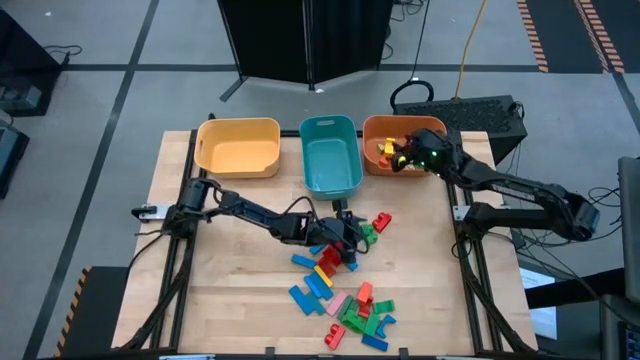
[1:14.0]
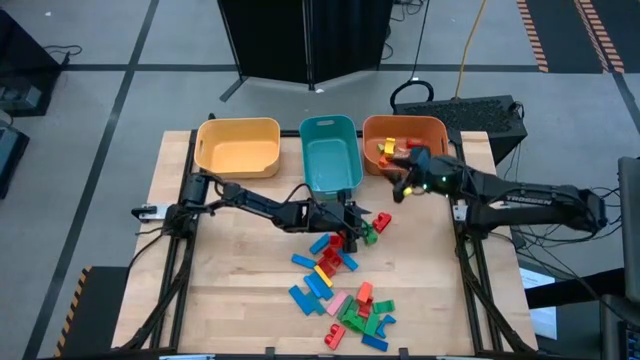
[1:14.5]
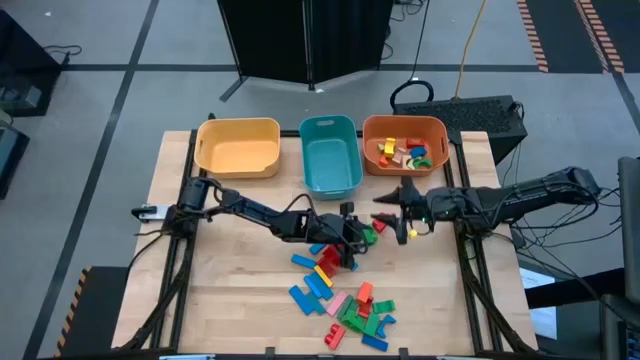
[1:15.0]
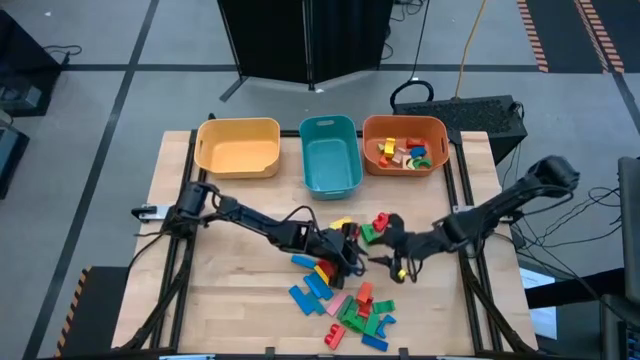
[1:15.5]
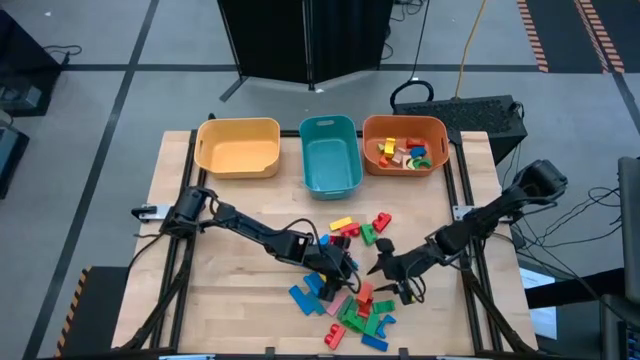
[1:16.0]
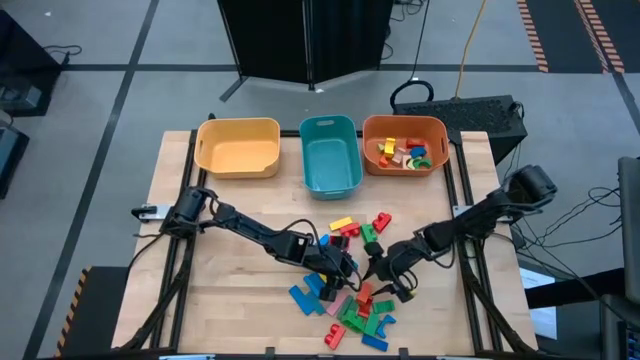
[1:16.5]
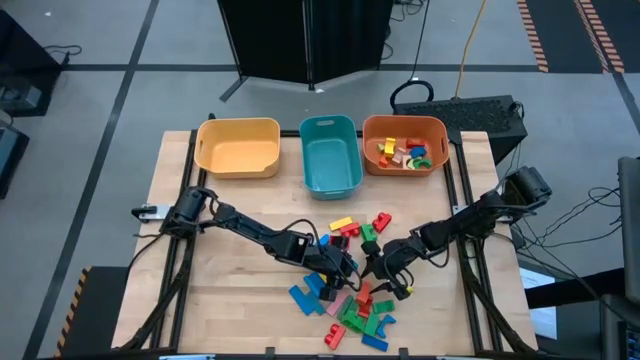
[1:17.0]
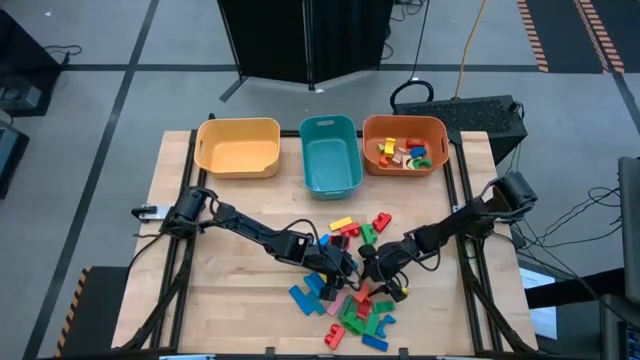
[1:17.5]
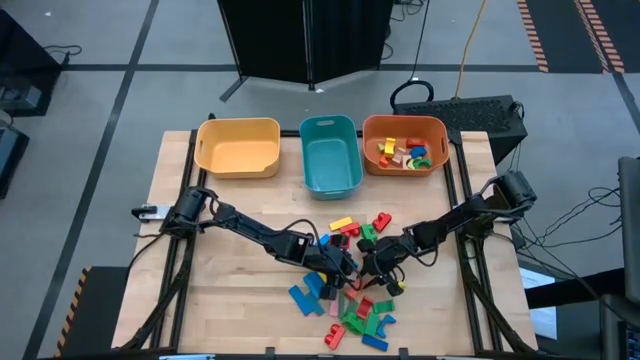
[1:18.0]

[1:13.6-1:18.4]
Task: Sort blocks by size
Put the orange arch block into the orange bin

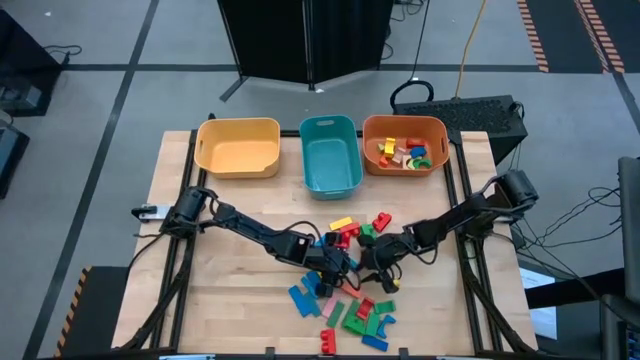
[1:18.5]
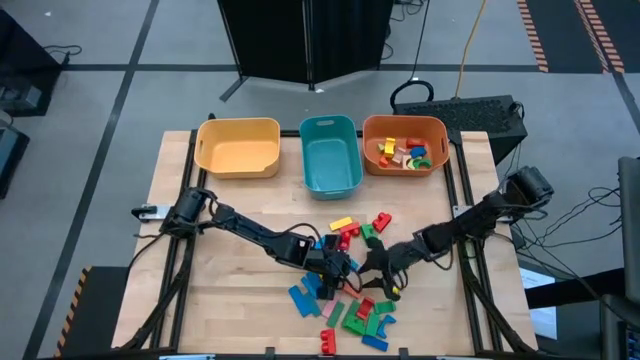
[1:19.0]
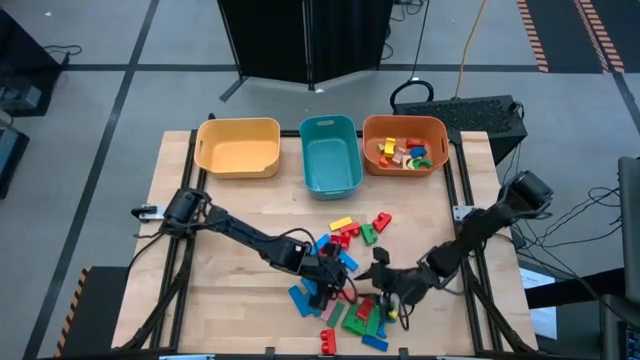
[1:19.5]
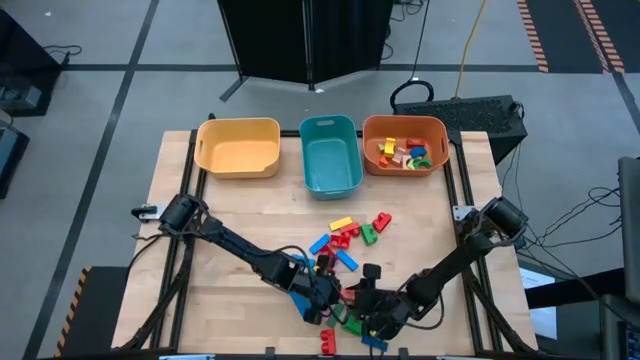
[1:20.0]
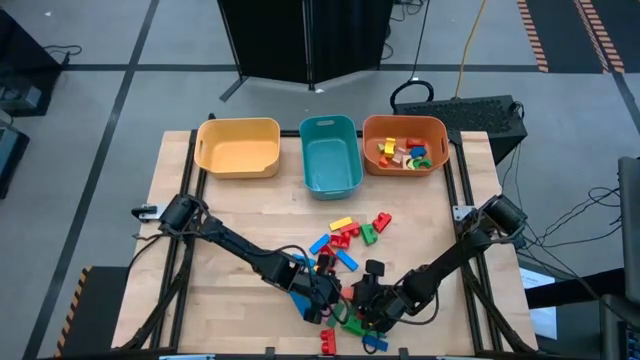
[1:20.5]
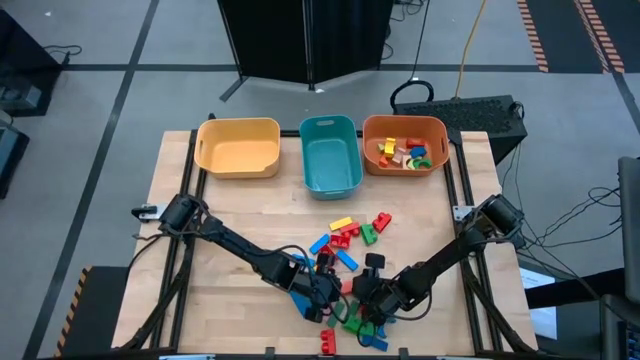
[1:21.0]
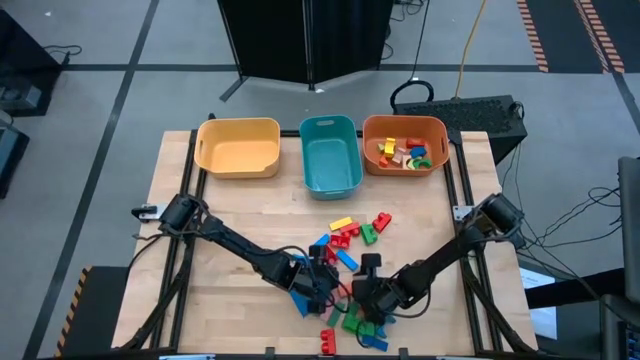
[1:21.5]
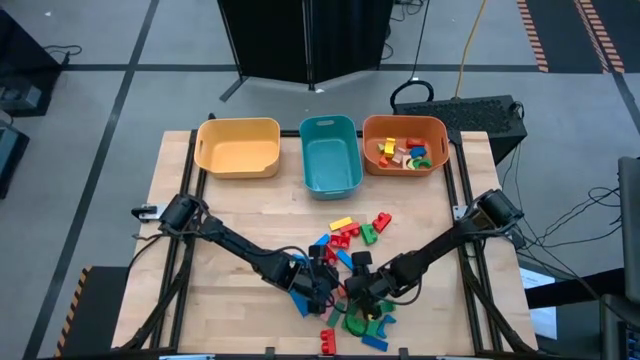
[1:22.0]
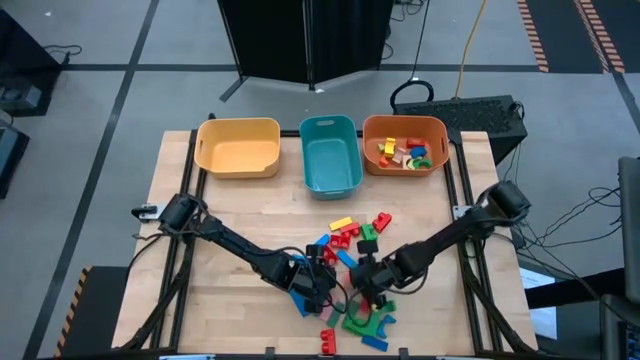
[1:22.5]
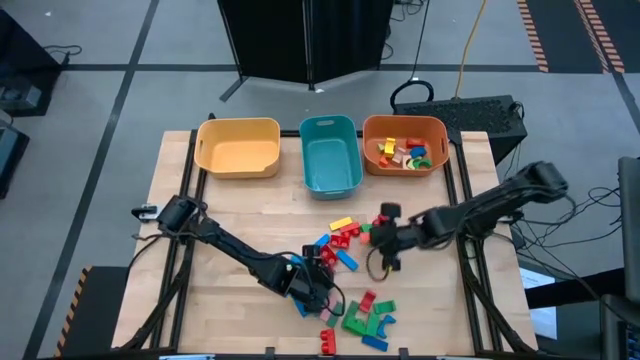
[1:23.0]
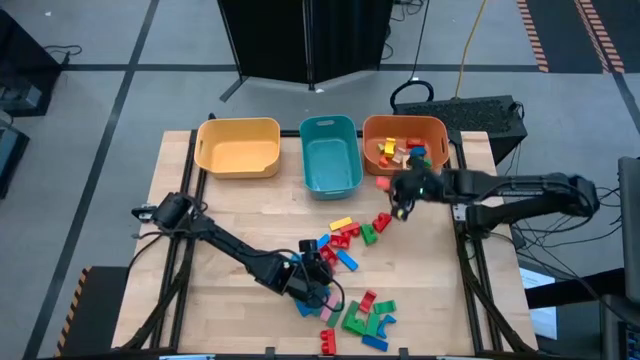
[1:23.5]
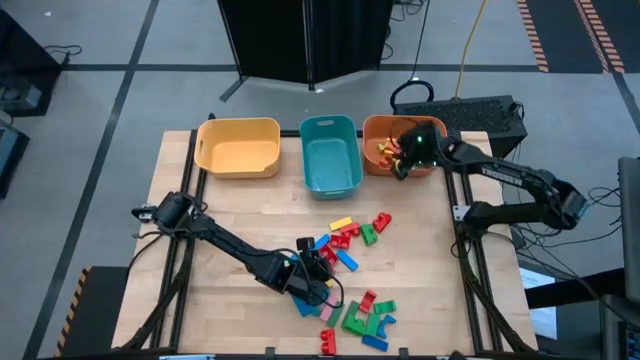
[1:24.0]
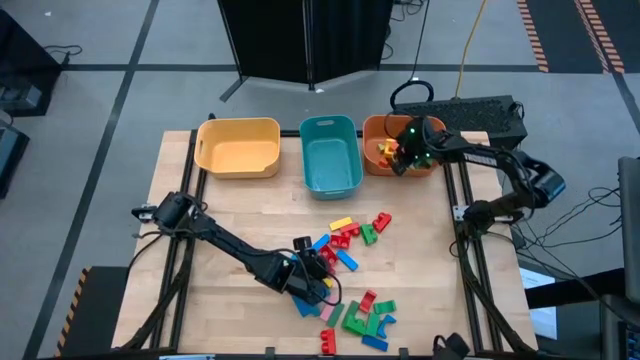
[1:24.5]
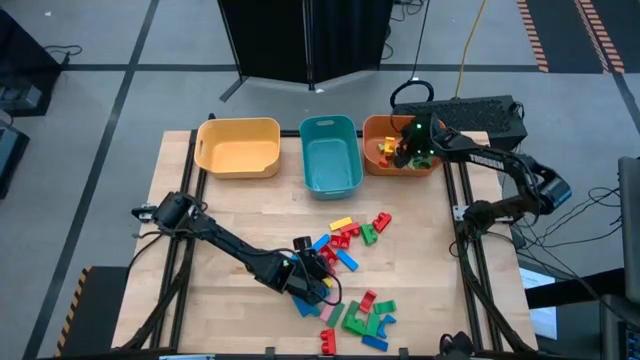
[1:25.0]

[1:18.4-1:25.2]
Put the orange arch block into the orange bin

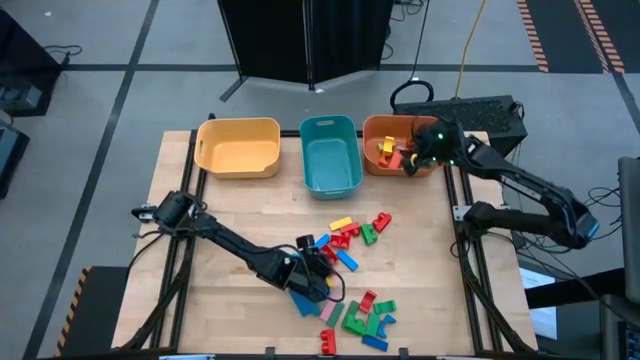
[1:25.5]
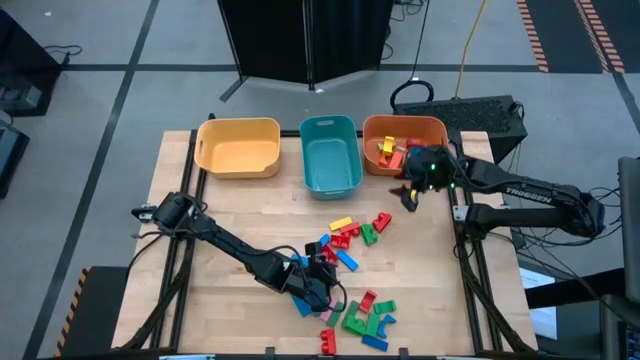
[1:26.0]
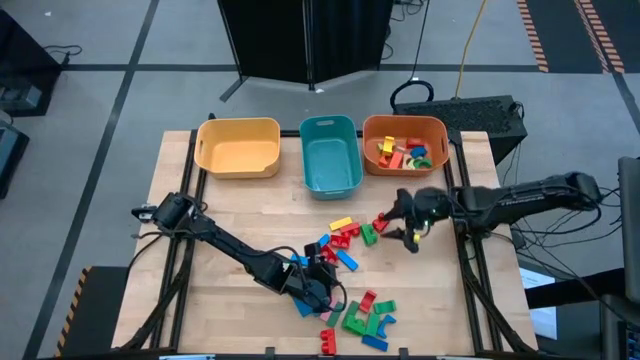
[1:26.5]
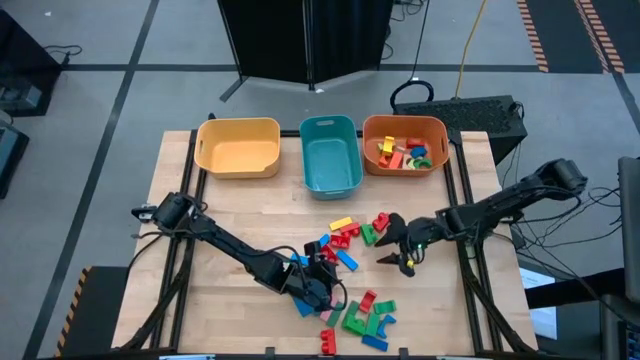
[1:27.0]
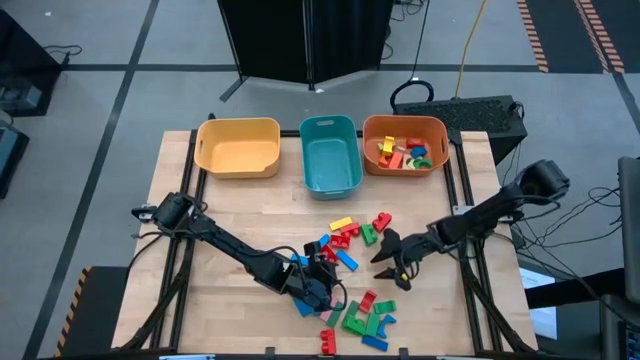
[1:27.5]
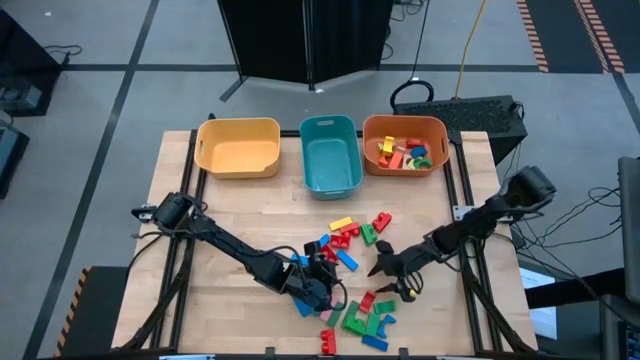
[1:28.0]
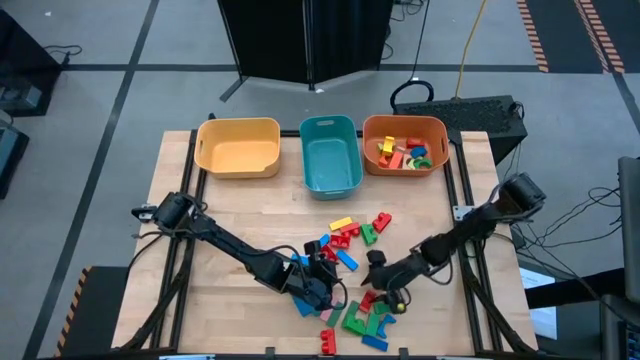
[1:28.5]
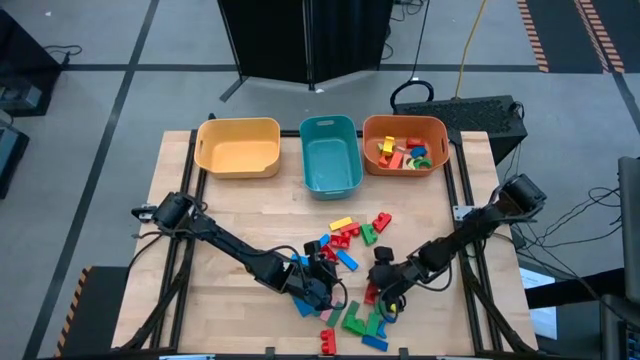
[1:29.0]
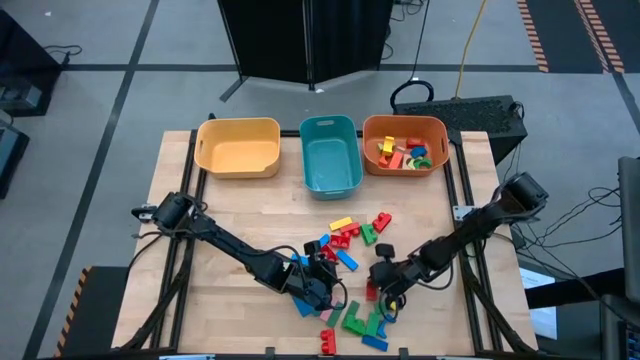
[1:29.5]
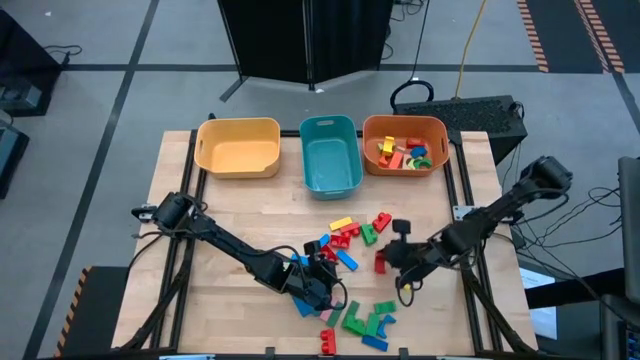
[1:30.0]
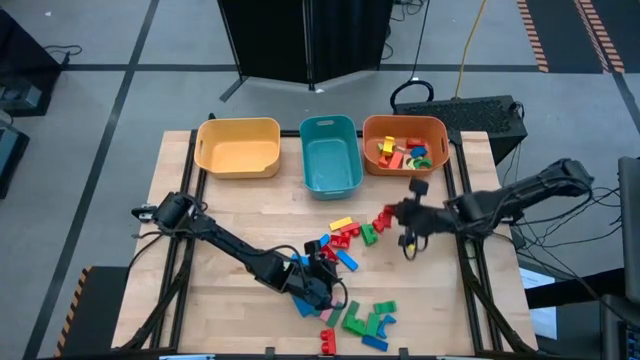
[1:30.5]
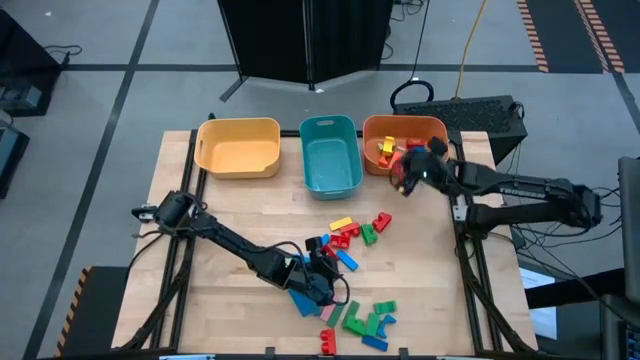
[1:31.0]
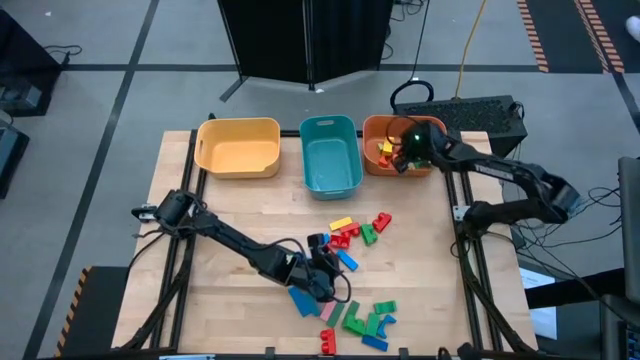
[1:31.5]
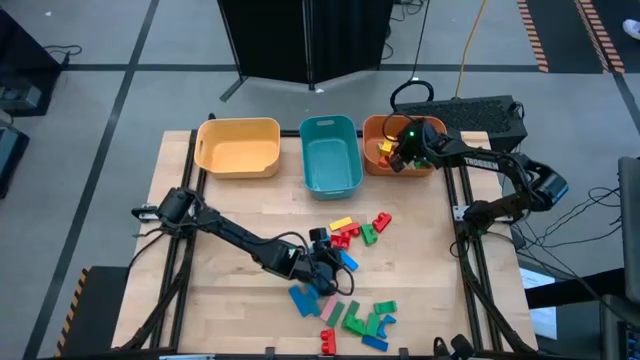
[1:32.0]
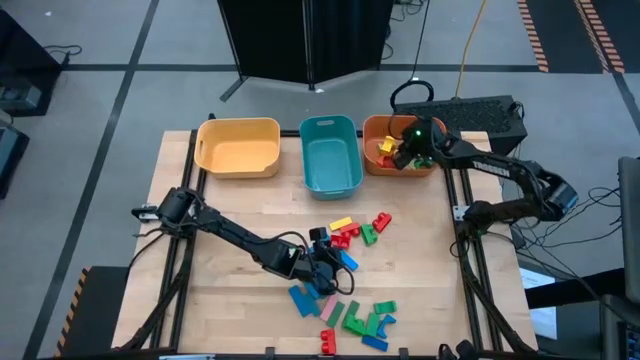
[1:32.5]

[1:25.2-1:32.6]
Put the red arch block into the orange bin

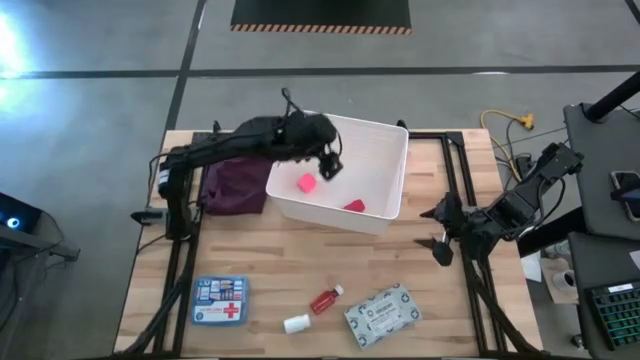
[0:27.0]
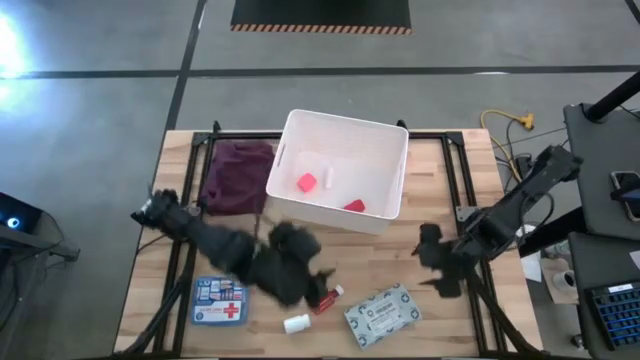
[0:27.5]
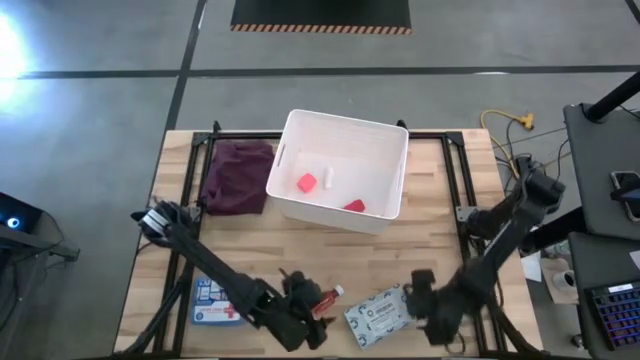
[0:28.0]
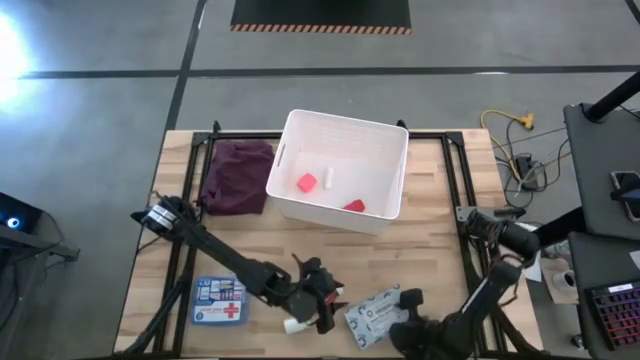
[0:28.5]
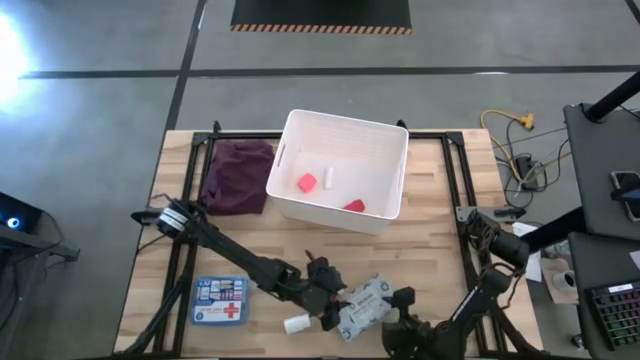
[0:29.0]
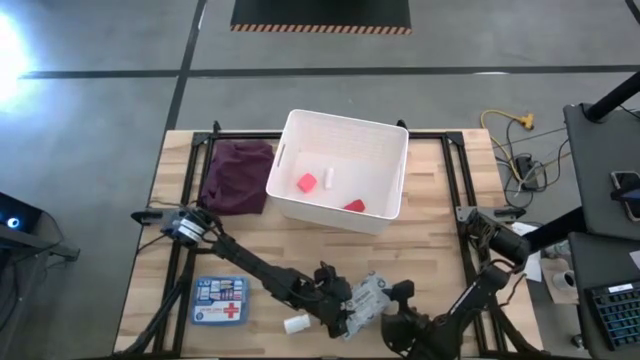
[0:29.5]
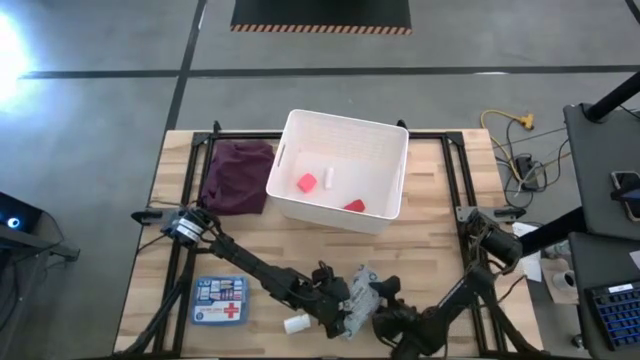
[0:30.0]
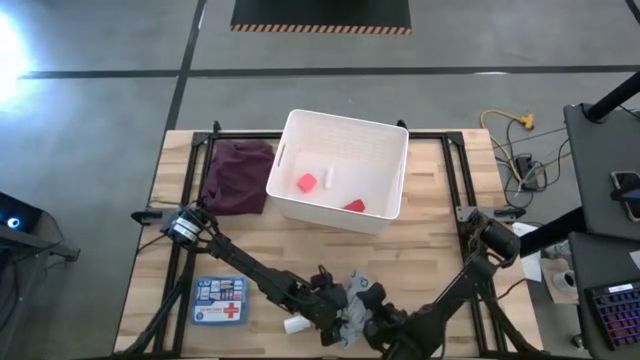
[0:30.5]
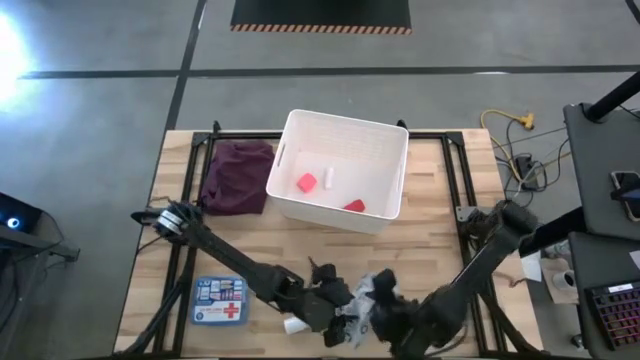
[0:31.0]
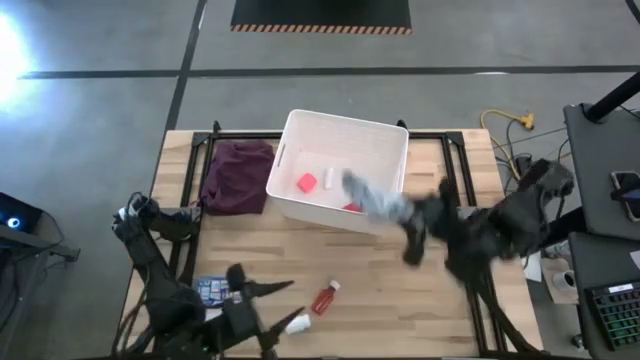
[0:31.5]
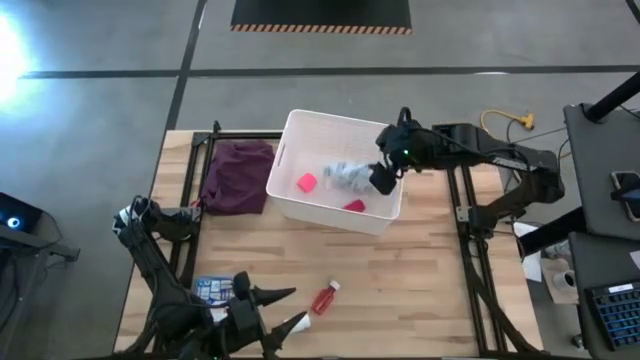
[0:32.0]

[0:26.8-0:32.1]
Task: Pick & place medical supplies in basket/bin
Put the white mailer bag into the white bin
